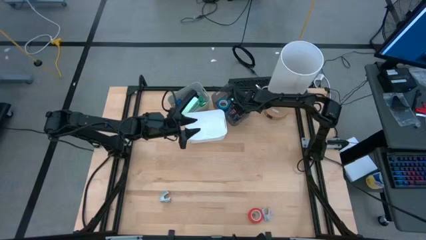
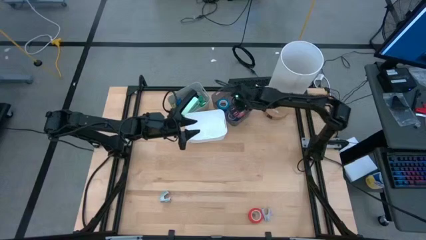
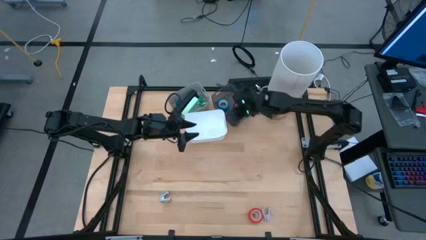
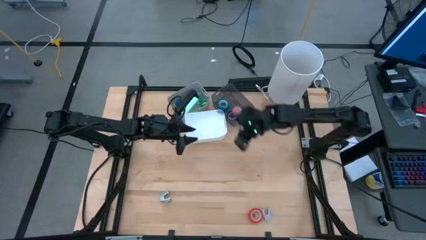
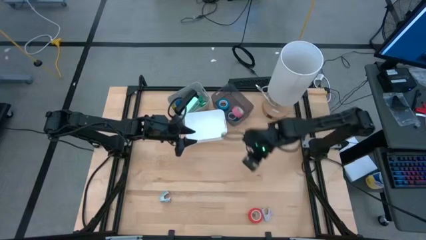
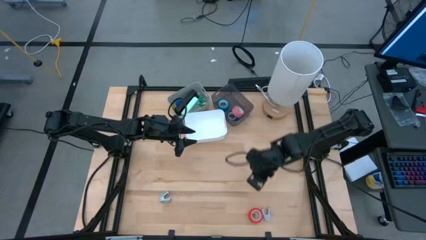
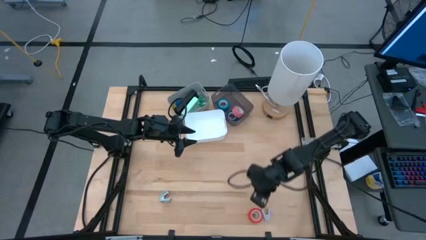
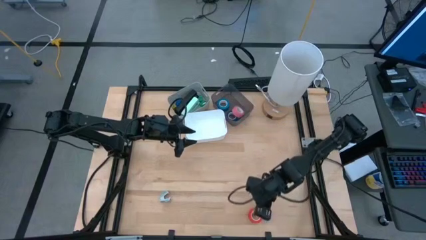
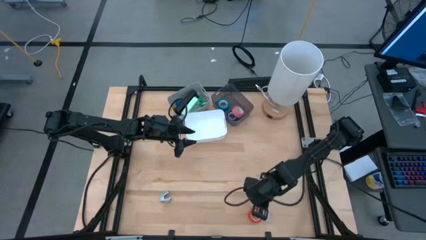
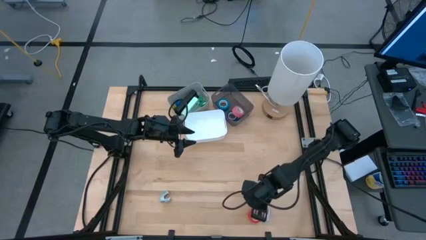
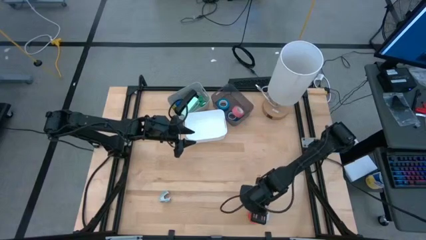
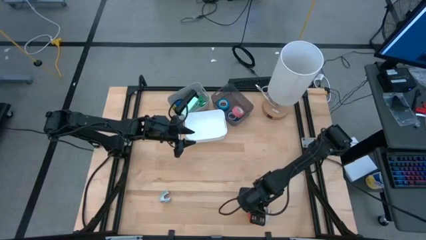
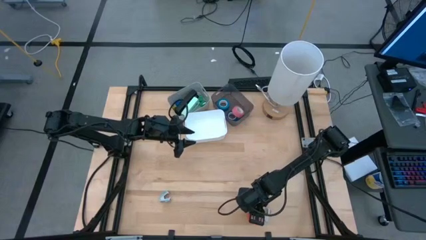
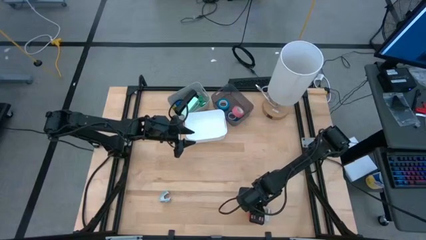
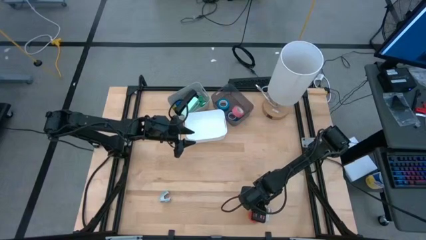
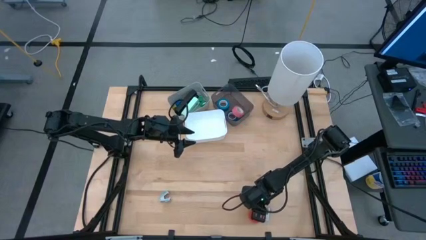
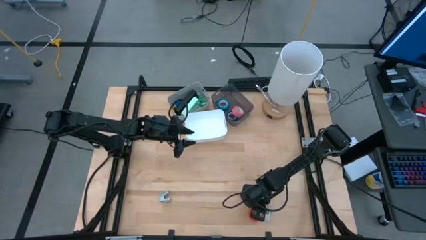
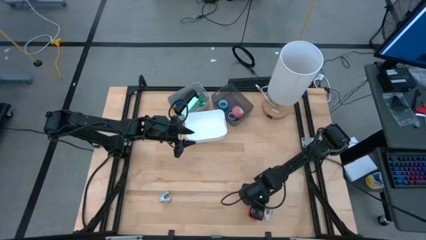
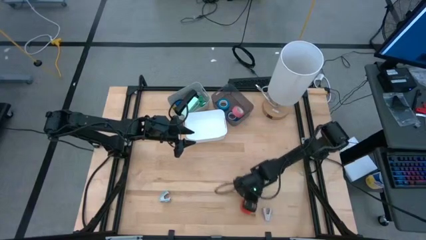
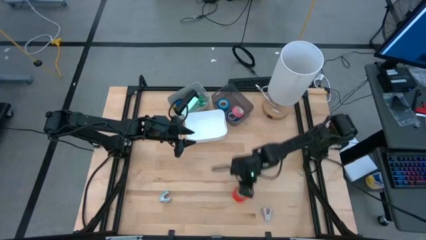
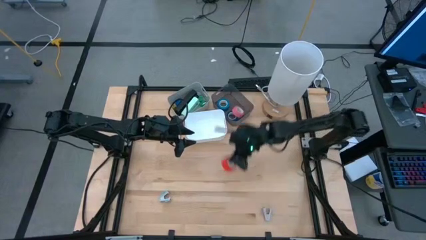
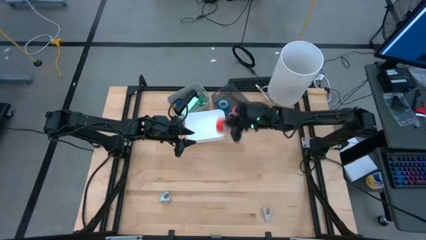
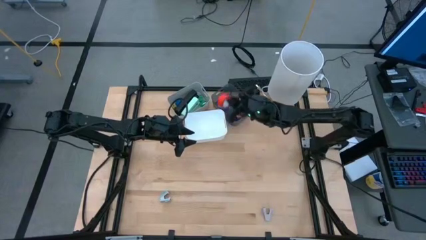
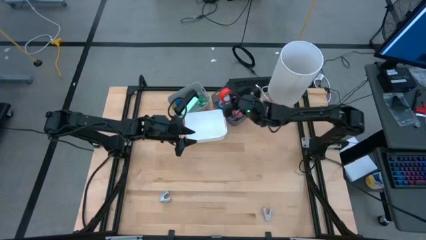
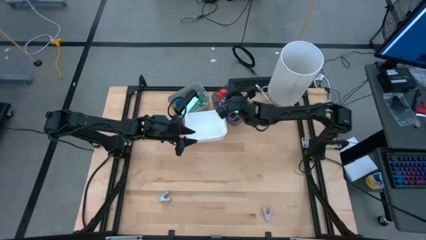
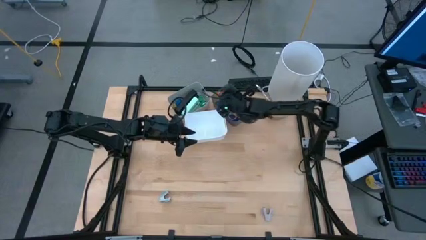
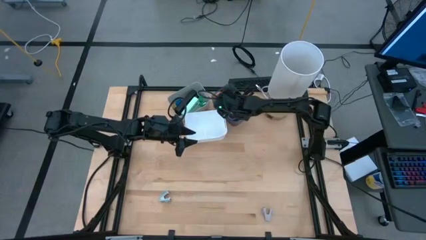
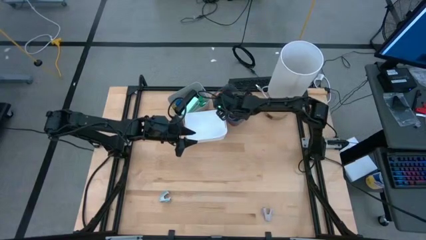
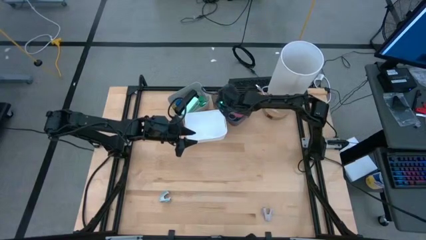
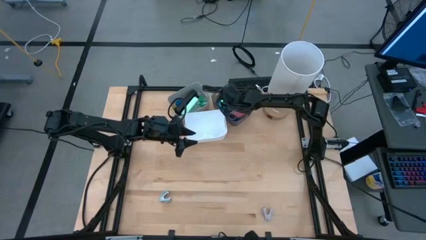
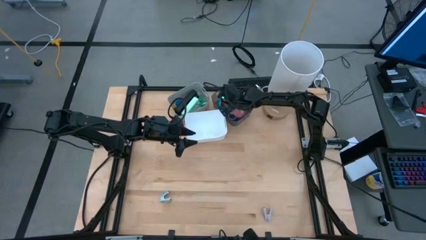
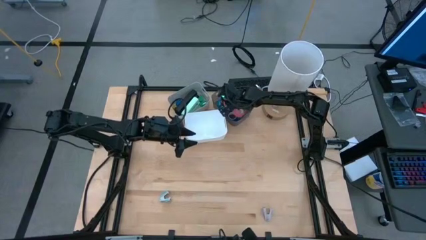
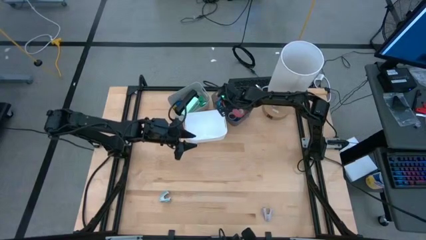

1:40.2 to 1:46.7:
Task: Pick and place Stapler, Stapler remover, tape
Put the orange tape into the black bin

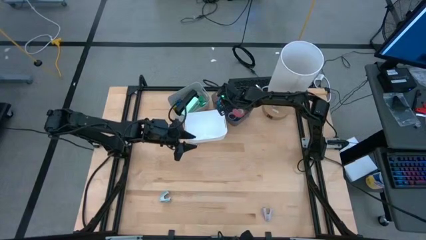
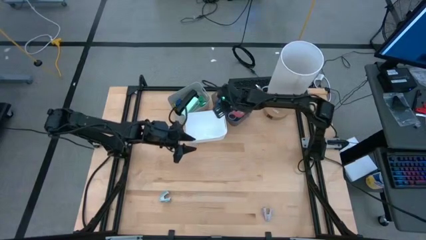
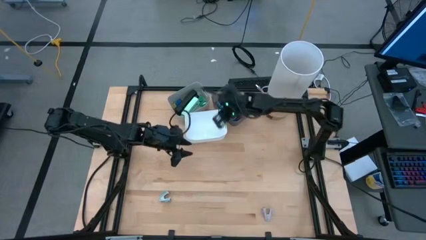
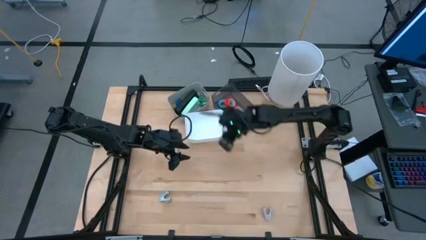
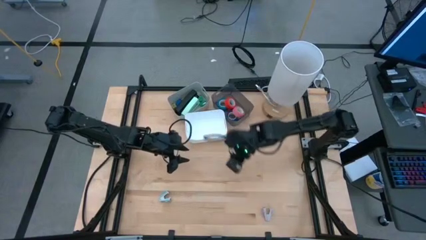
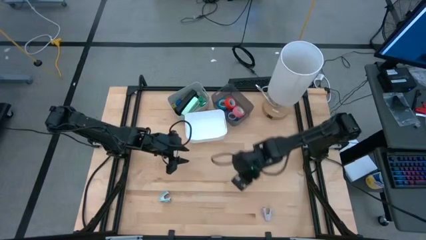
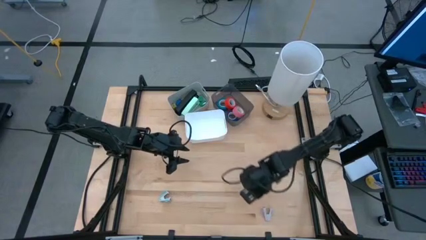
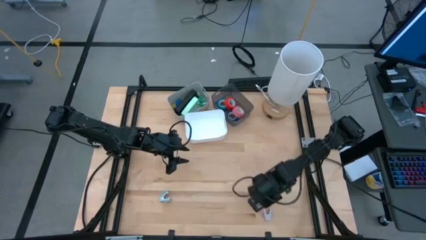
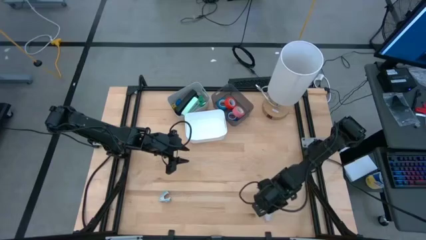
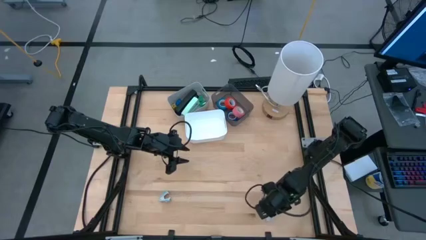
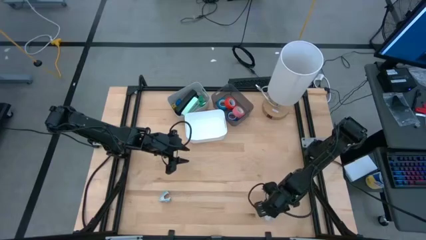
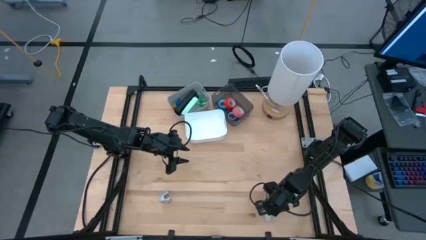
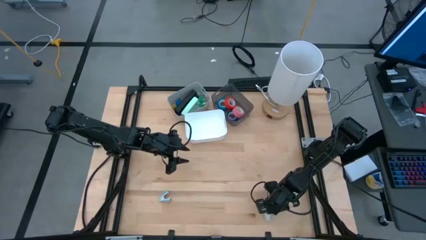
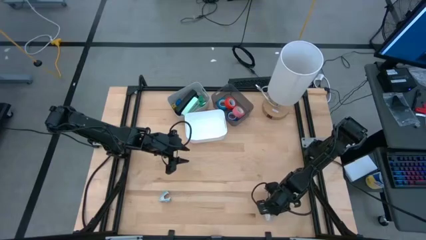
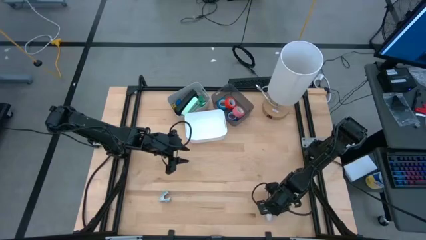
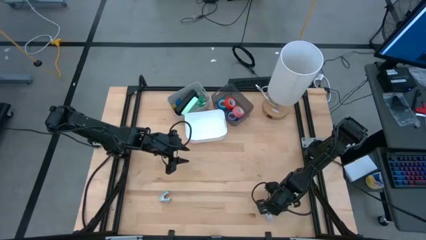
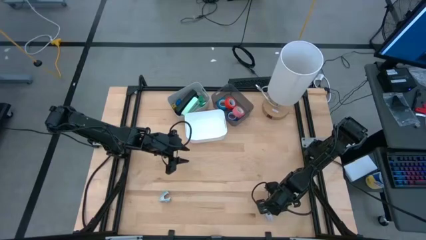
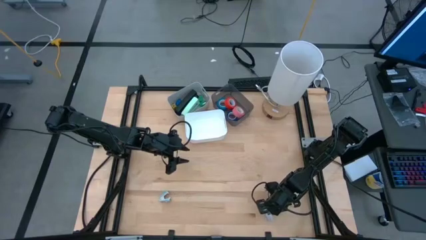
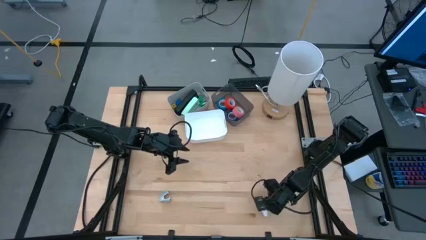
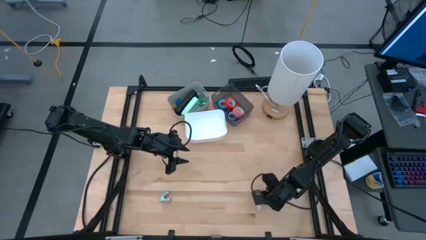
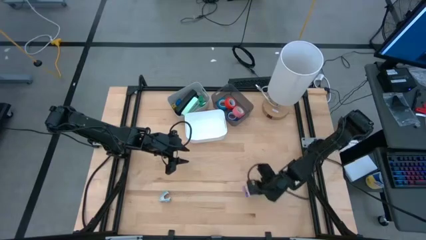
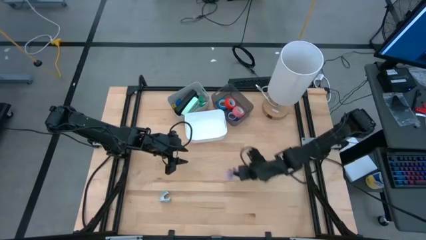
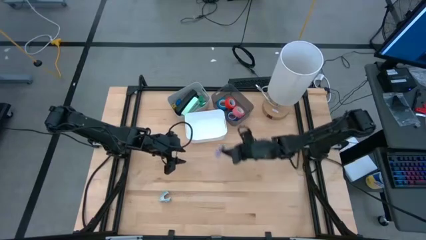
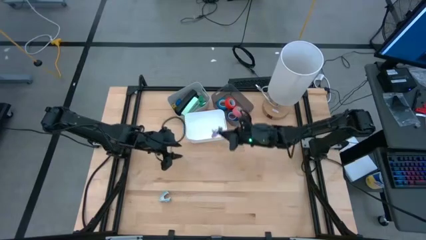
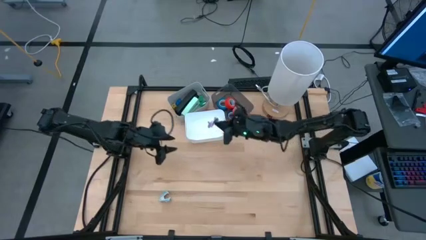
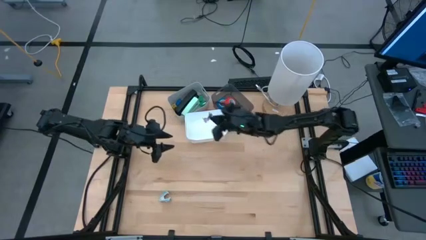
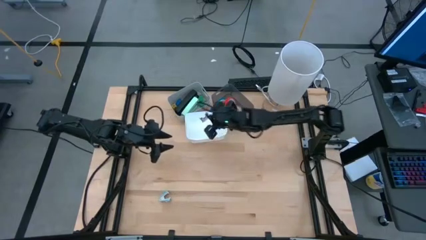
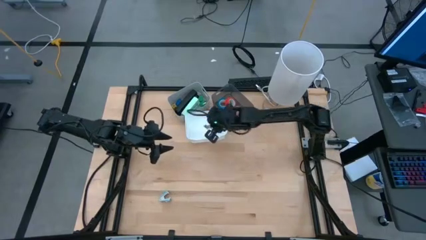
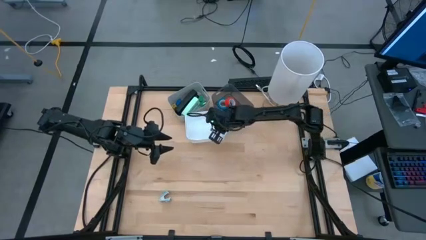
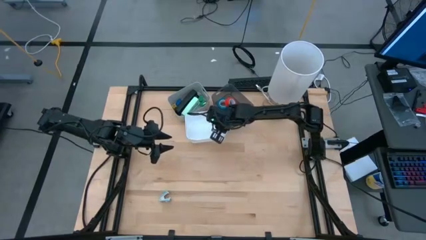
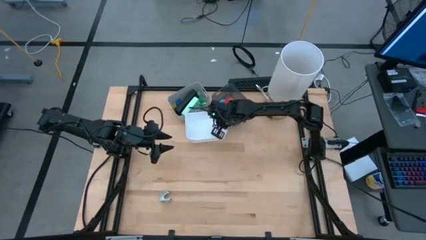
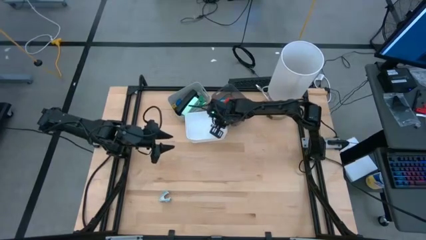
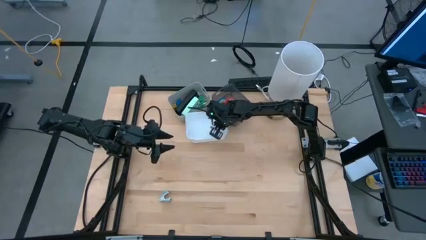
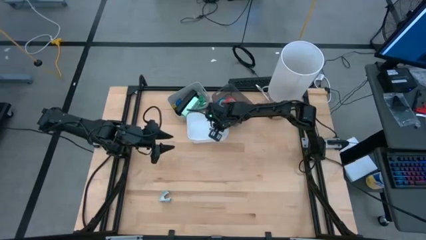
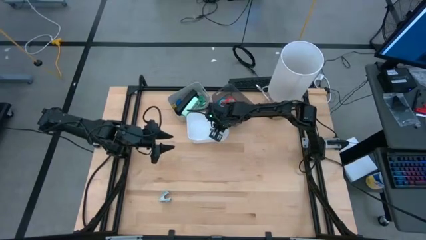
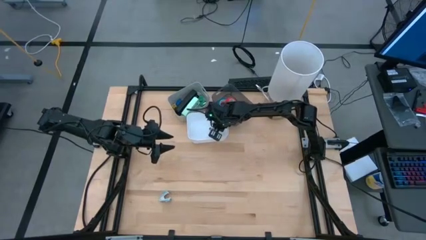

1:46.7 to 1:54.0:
Put the violet staple remover into the white bin

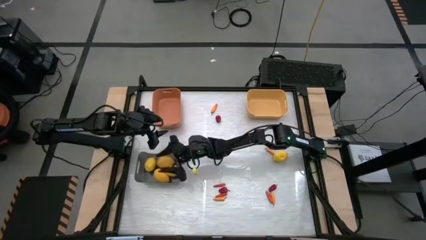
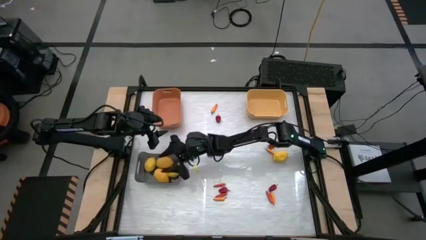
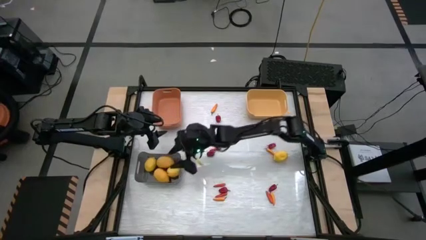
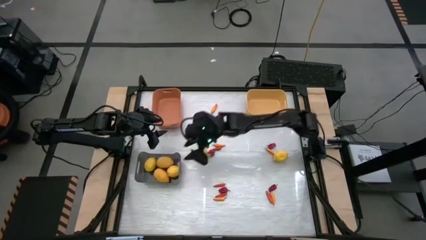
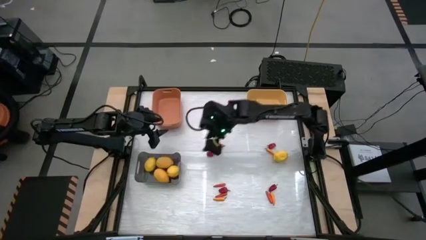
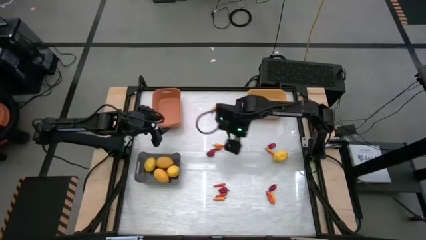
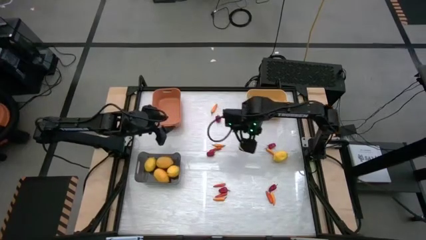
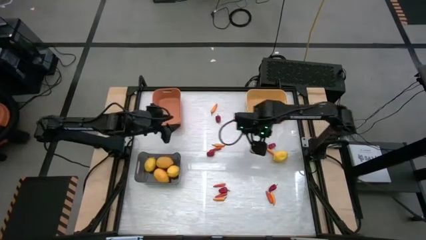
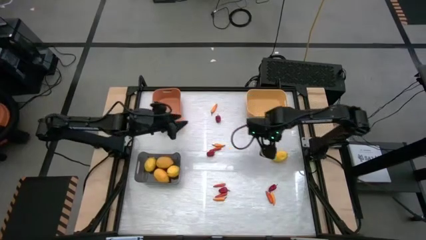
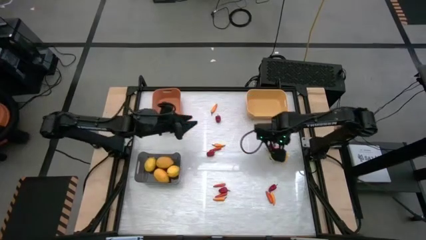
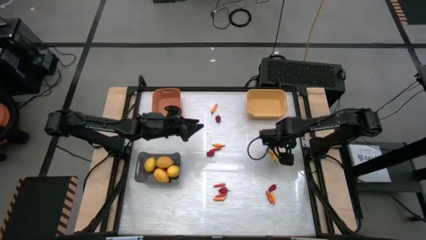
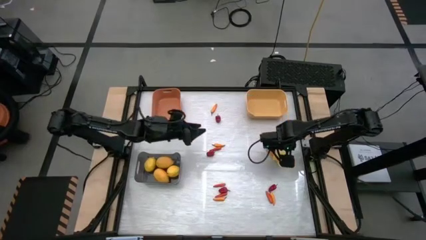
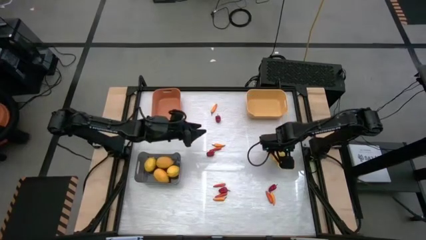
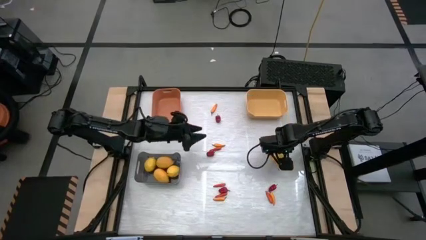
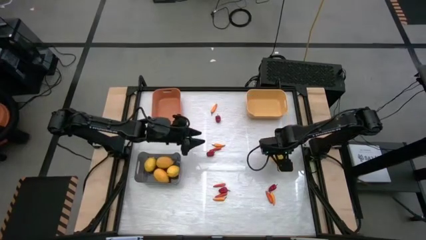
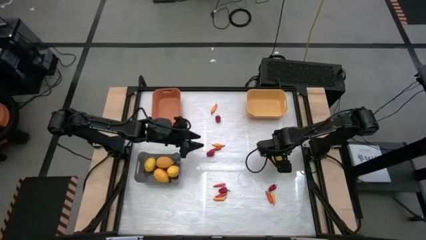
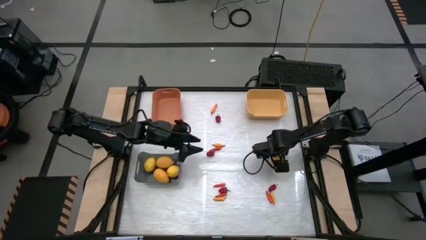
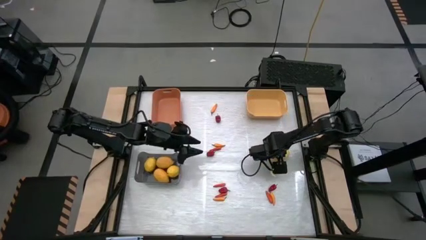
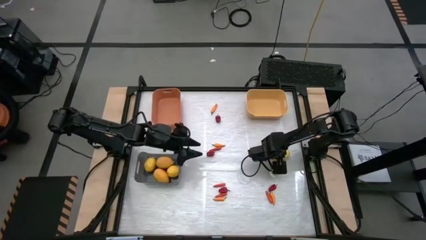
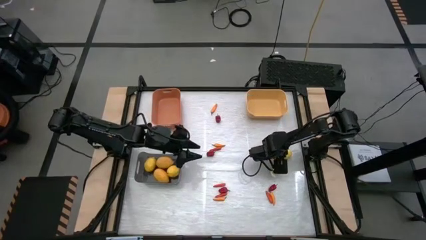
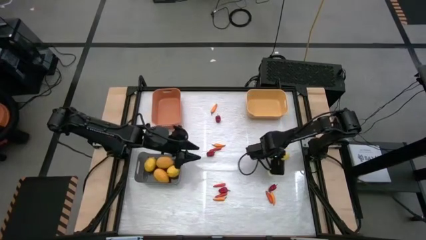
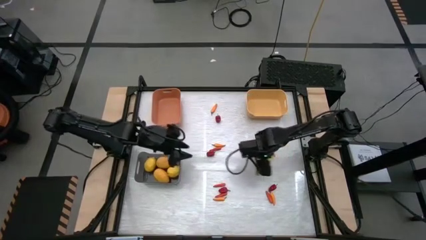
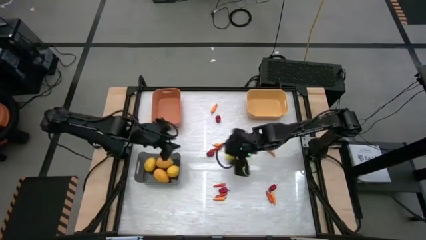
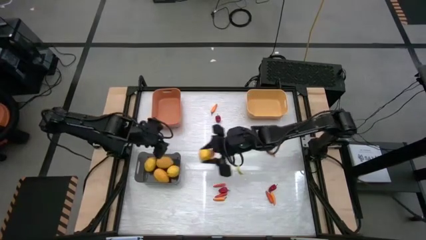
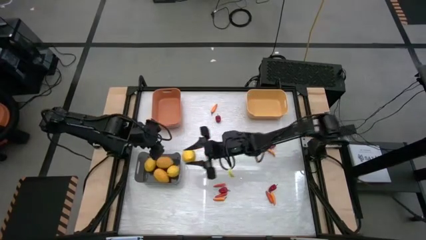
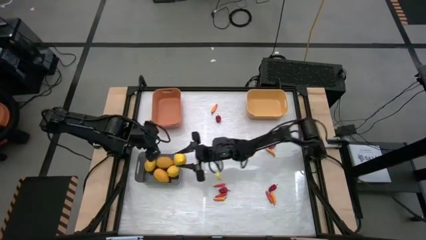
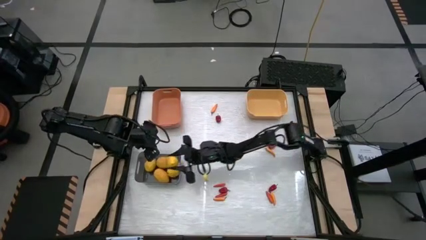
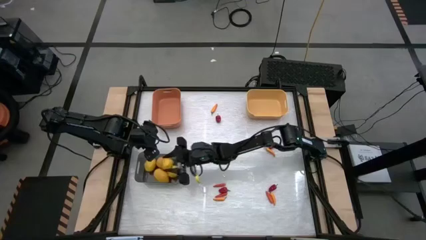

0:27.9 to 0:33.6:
Task: Sort produce into baskets
Put the yellow lemon into the black bin
